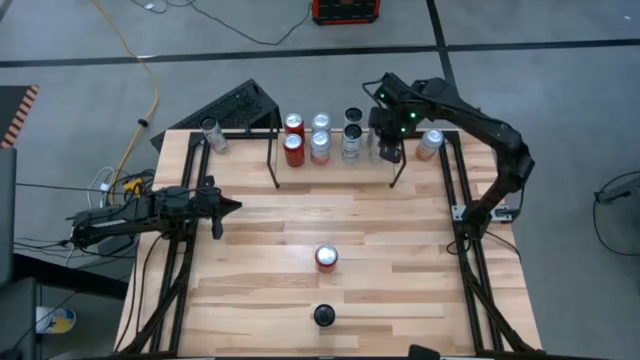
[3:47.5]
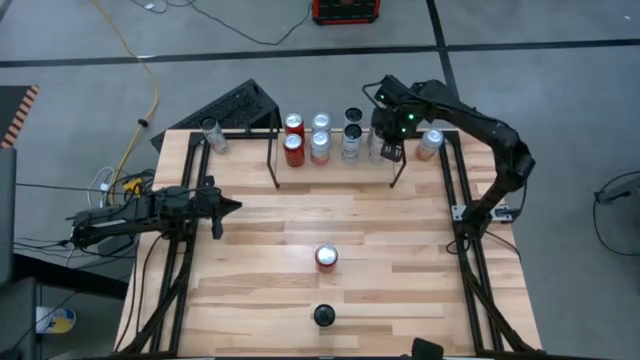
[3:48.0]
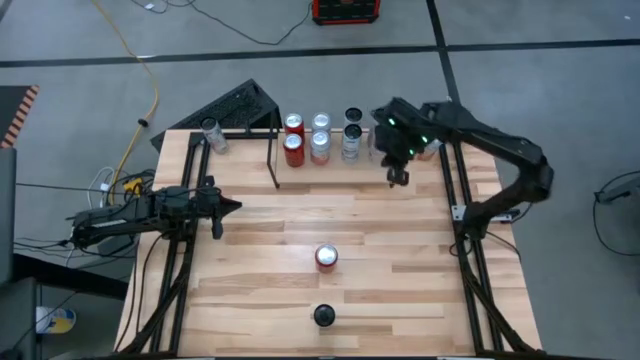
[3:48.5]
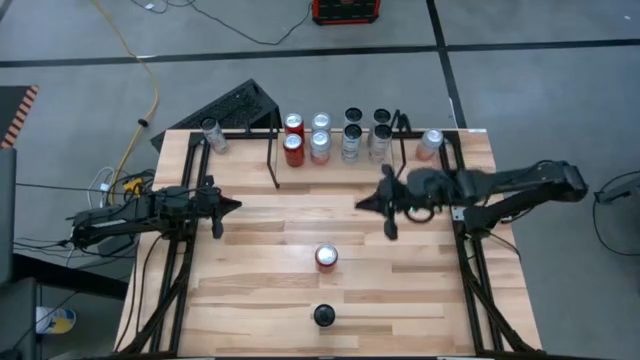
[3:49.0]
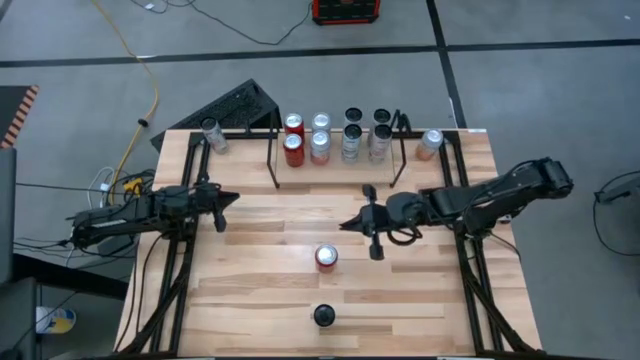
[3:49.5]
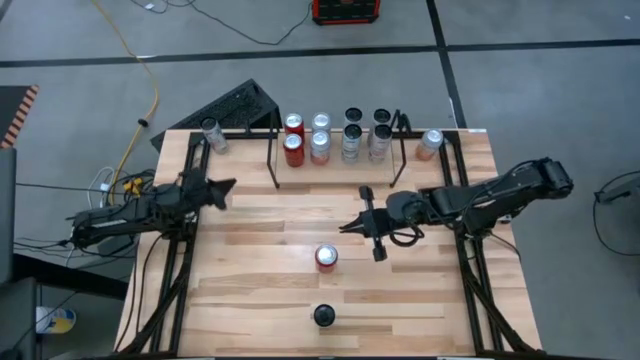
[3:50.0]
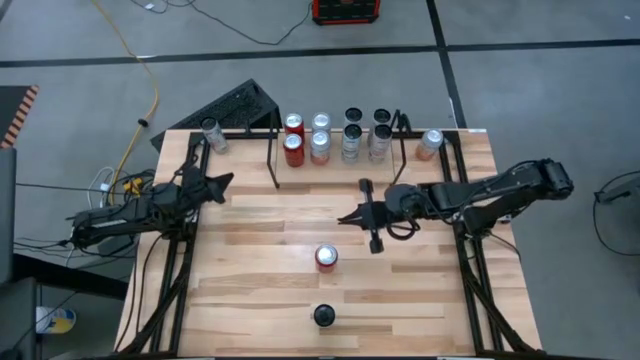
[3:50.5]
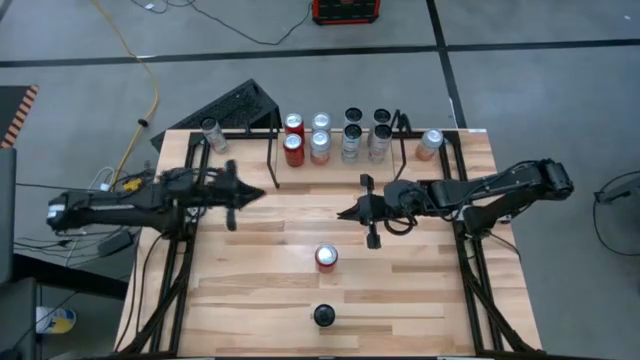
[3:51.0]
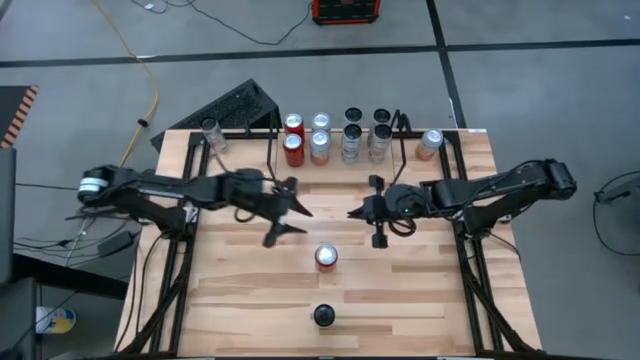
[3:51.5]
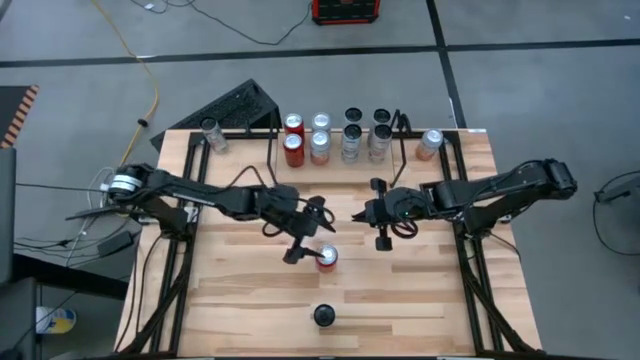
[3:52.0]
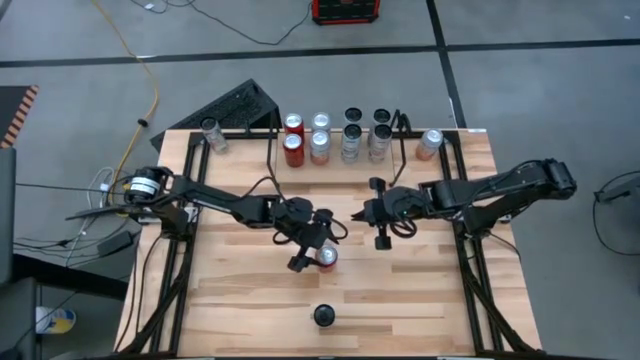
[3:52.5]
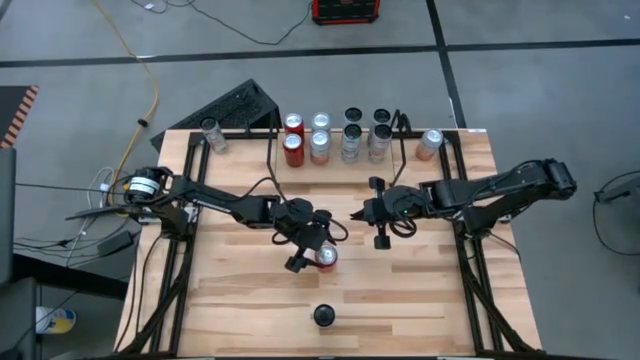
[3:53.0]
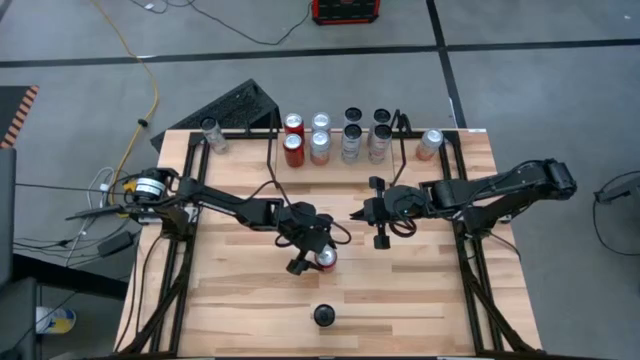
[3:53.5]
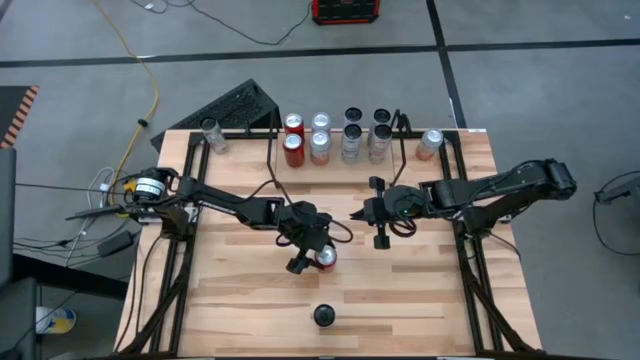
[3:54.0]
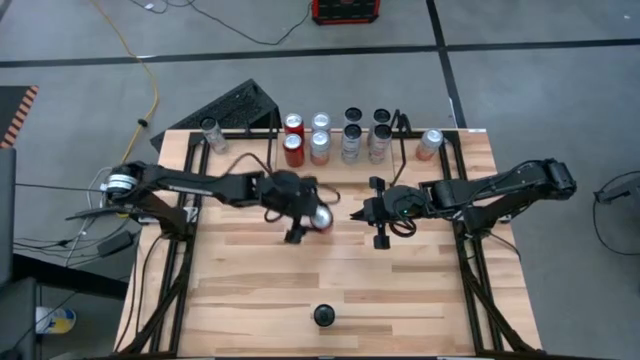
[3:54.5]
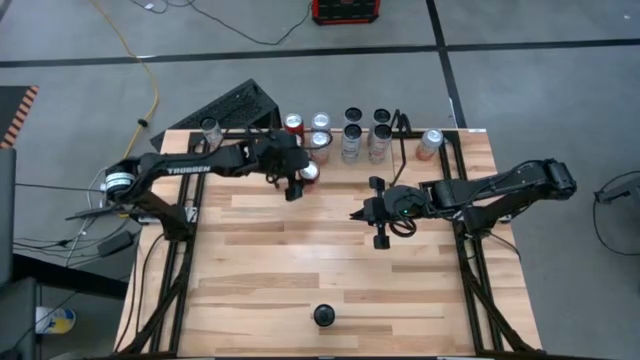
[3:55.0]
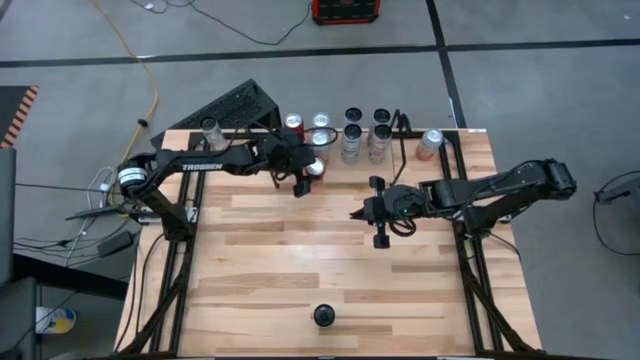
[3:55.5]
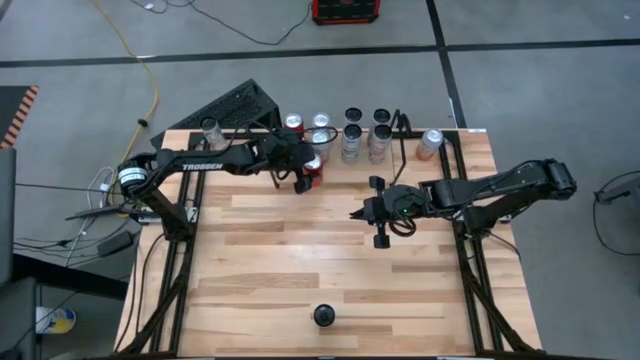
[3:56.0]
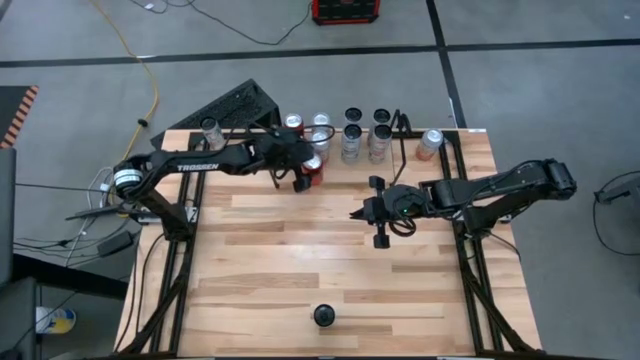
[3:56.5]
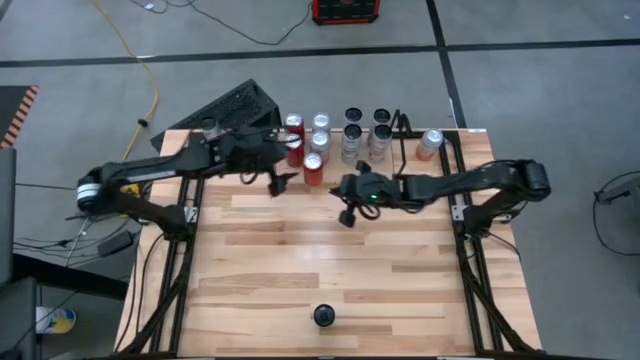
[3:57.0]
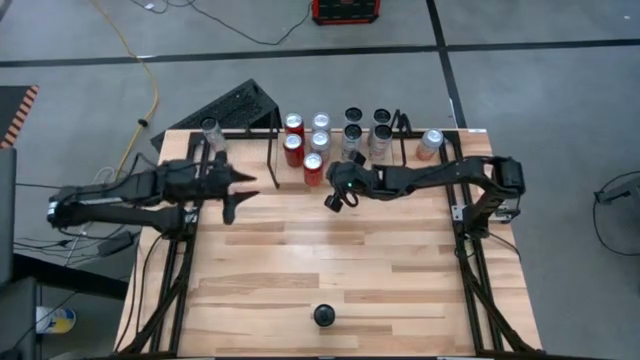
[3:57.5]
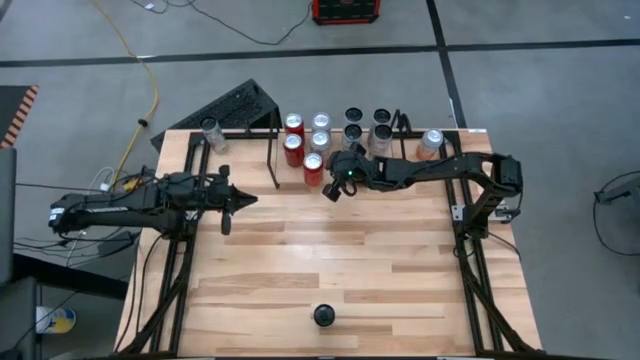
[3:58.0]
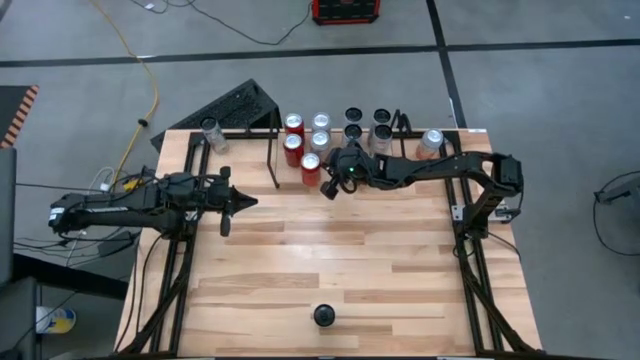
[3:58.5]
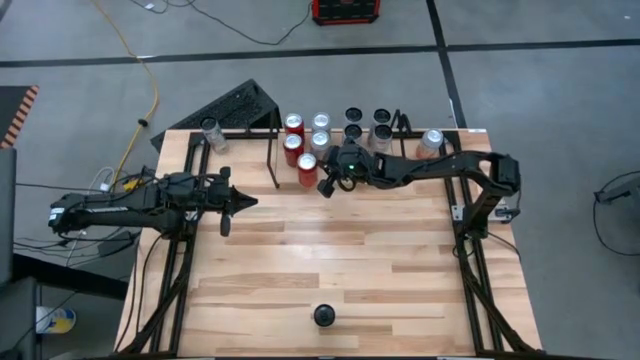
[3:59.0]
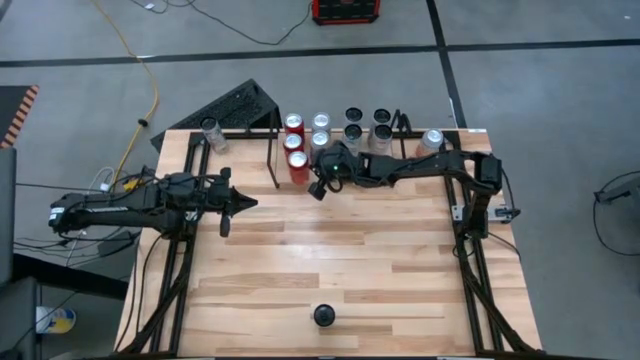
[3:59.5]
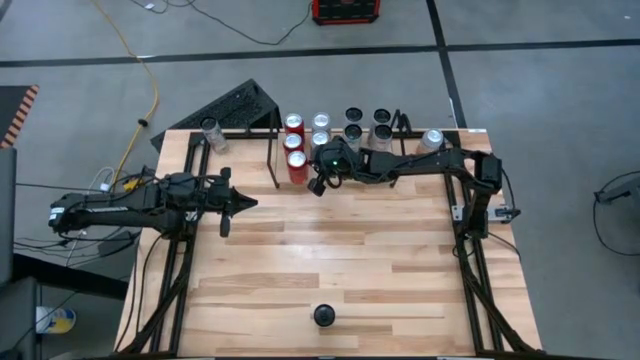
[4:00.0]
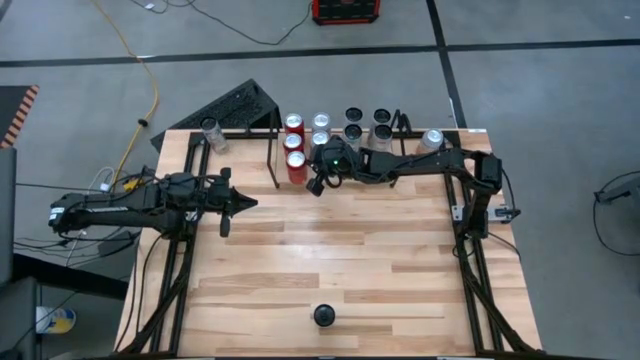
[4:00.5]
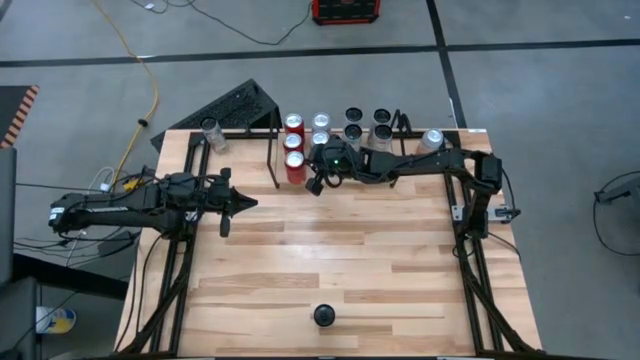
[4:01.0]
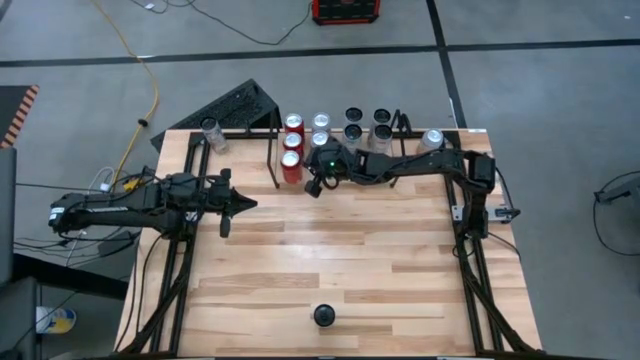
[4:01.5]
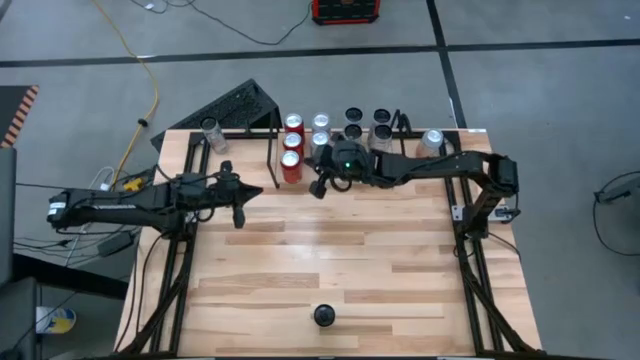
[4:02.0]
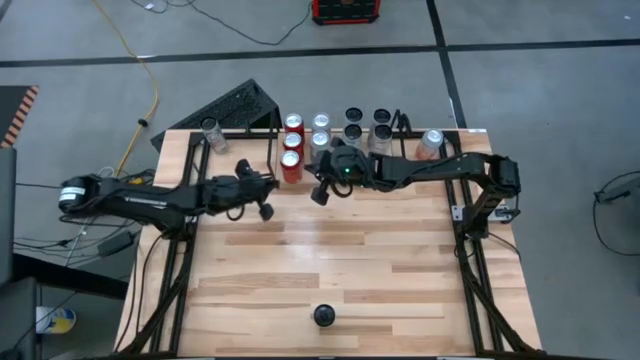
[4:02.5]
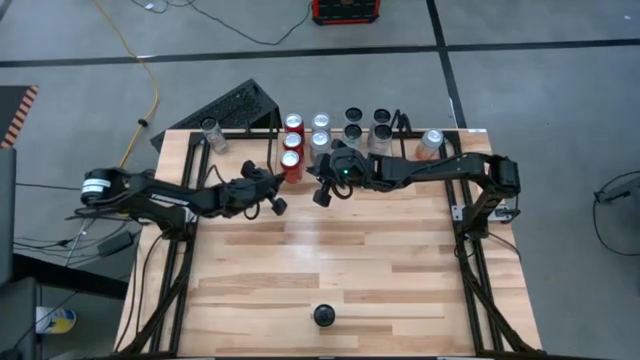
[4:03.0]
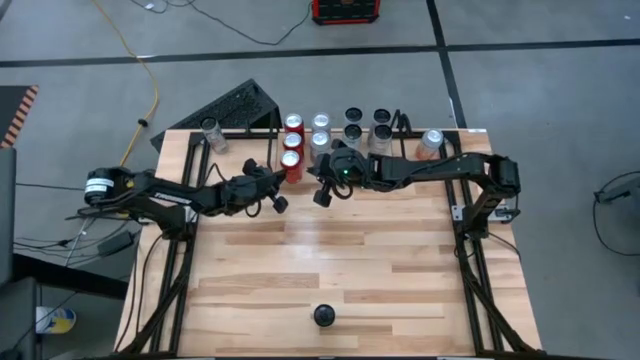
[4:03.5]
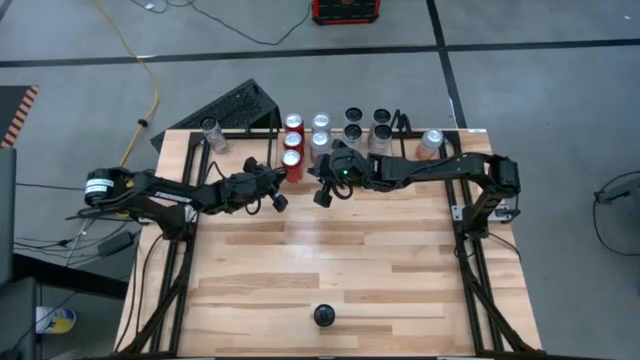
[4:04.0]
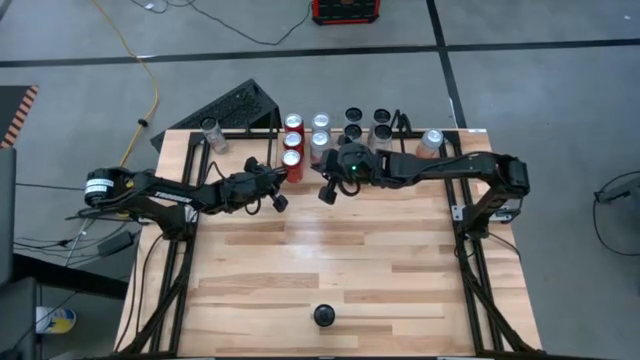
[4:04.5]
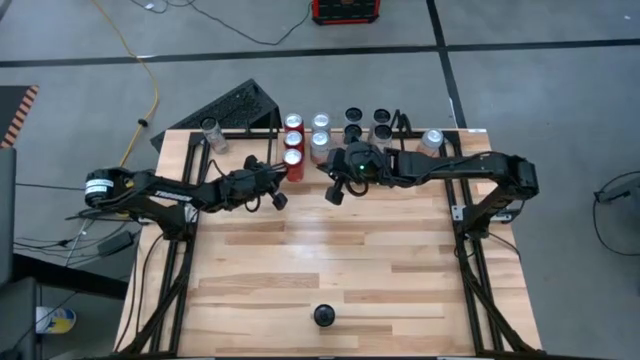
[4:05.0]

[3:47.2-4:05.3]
Task: Place canned beverage on shelf
Put the red black soda can on the shelf aligned with the other red black soda cans
